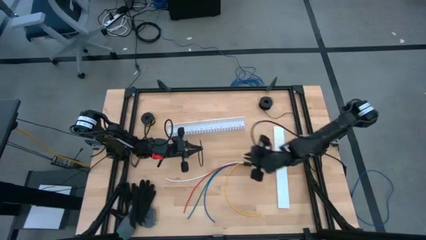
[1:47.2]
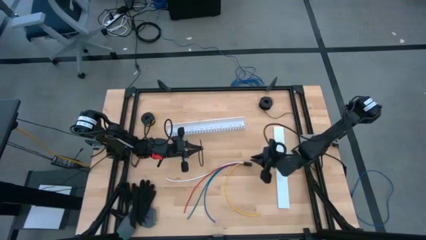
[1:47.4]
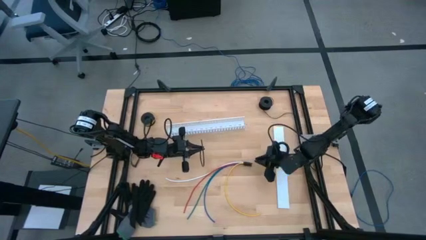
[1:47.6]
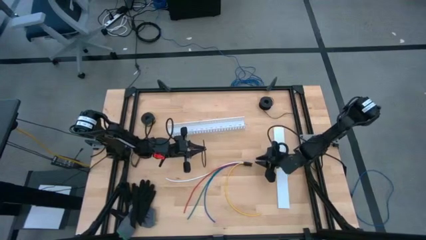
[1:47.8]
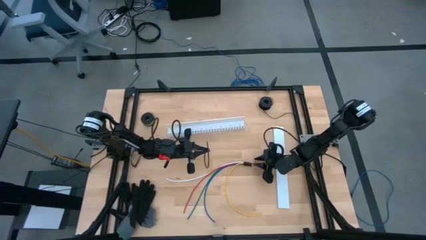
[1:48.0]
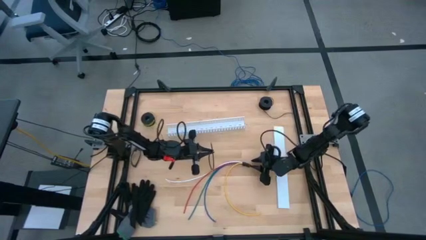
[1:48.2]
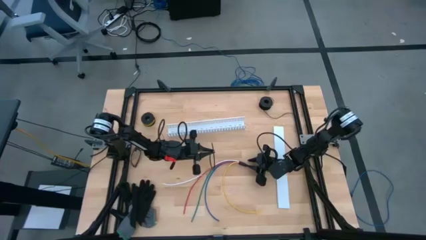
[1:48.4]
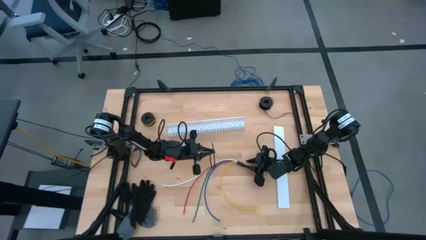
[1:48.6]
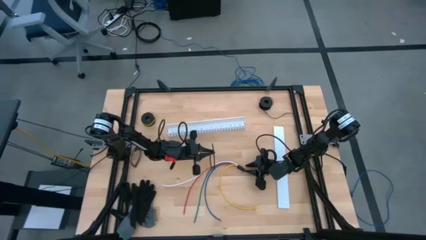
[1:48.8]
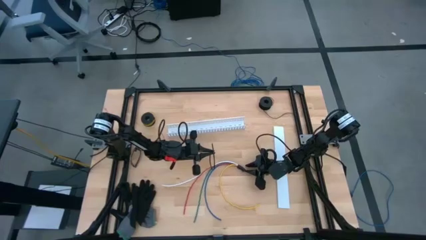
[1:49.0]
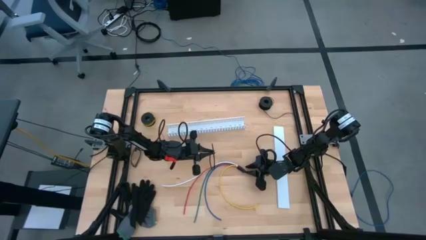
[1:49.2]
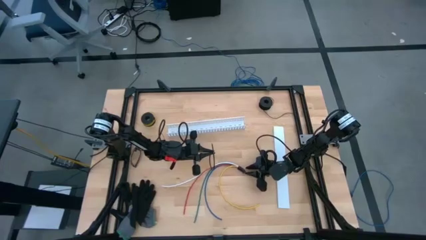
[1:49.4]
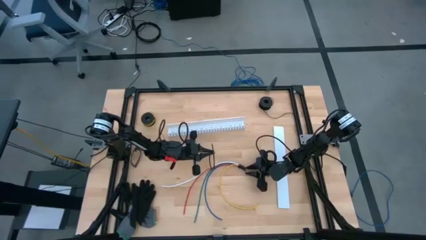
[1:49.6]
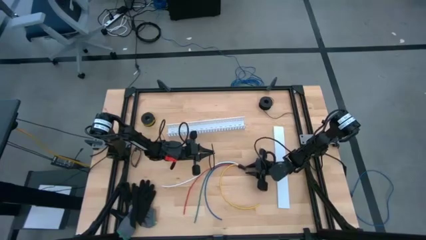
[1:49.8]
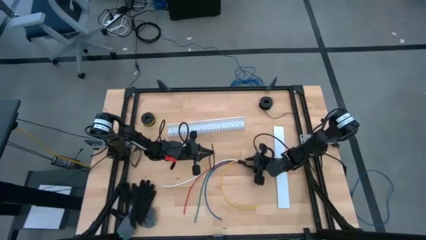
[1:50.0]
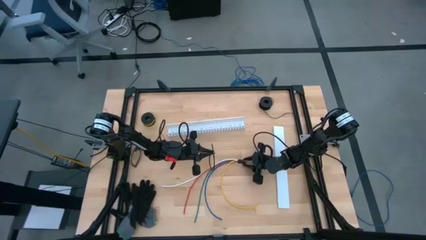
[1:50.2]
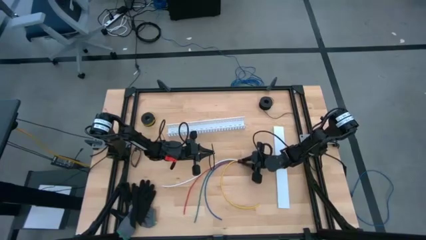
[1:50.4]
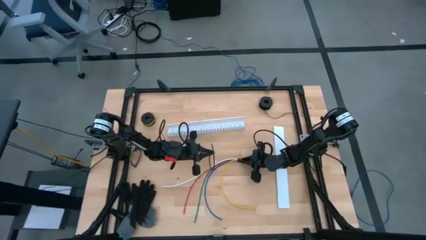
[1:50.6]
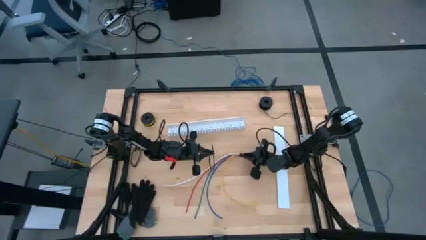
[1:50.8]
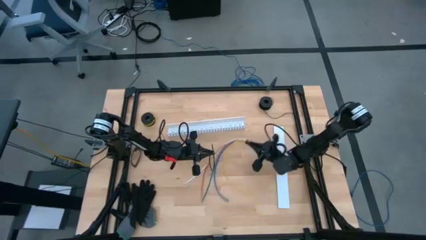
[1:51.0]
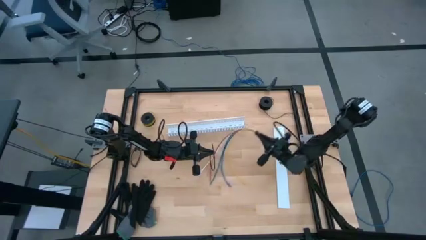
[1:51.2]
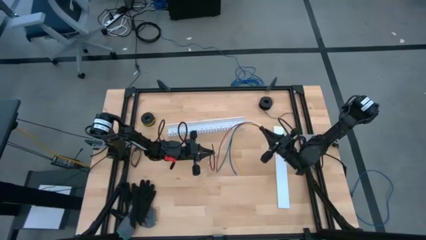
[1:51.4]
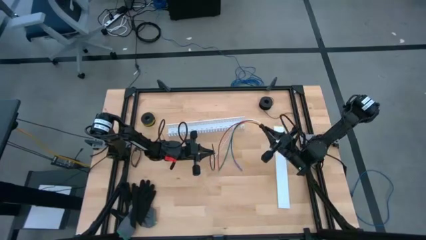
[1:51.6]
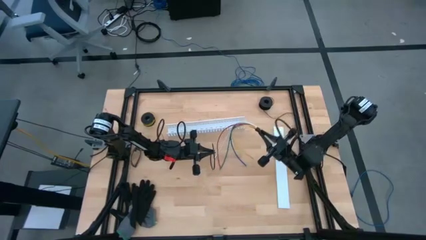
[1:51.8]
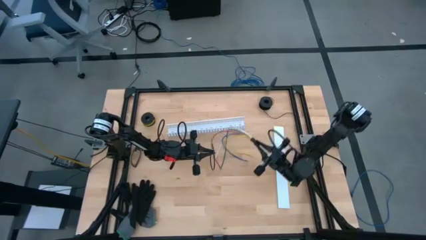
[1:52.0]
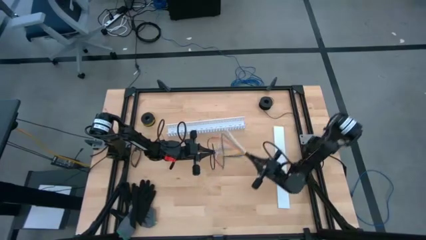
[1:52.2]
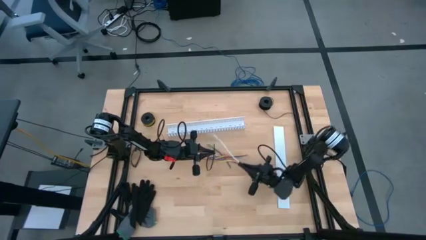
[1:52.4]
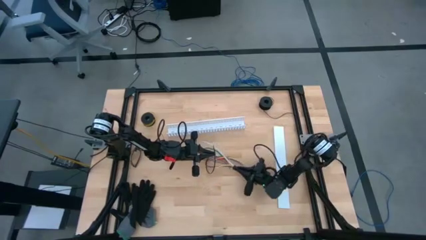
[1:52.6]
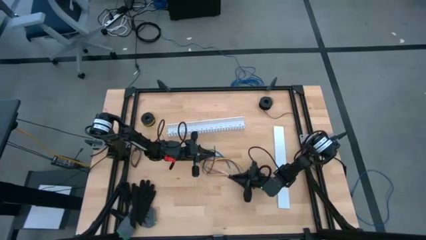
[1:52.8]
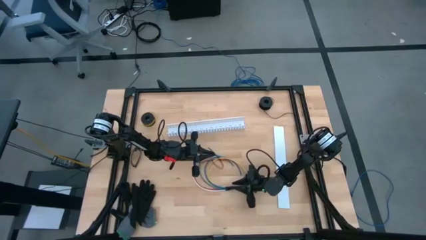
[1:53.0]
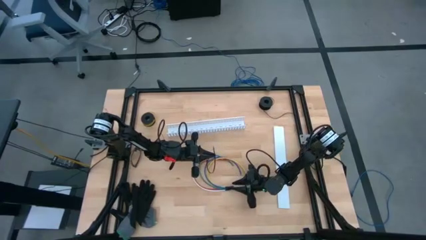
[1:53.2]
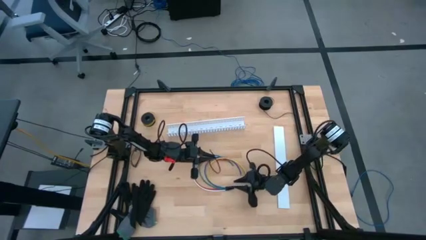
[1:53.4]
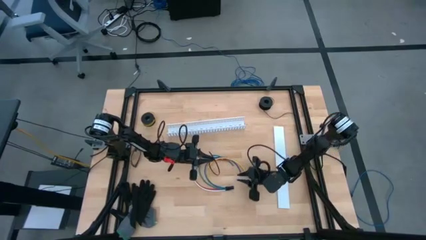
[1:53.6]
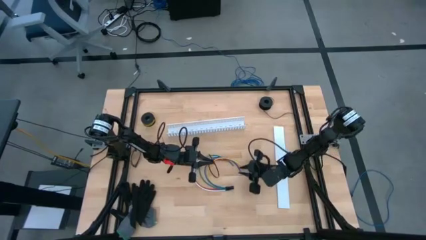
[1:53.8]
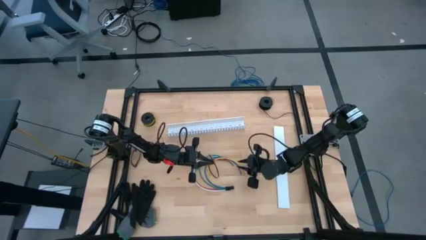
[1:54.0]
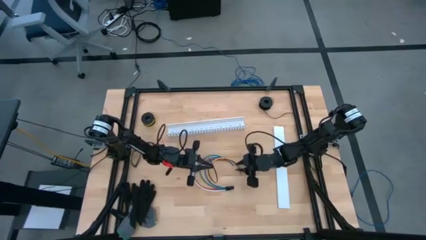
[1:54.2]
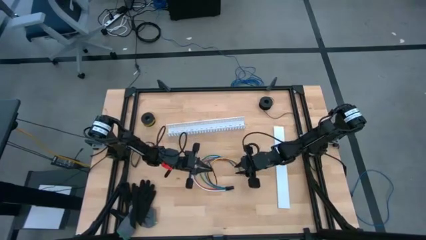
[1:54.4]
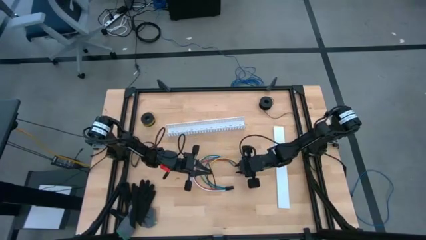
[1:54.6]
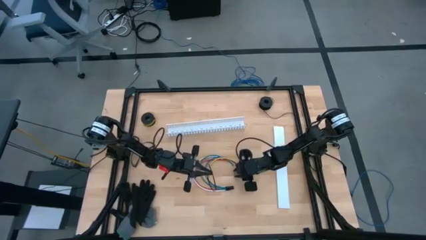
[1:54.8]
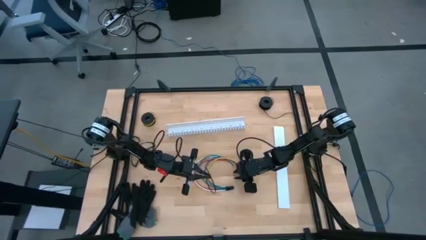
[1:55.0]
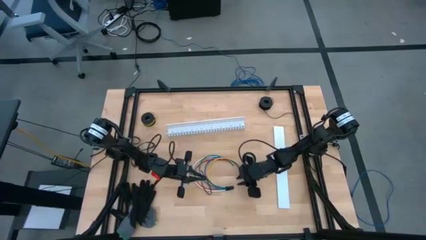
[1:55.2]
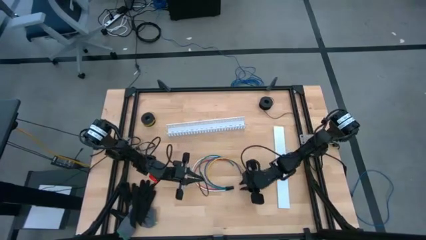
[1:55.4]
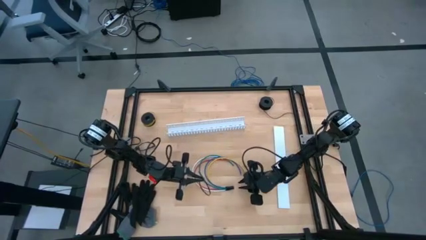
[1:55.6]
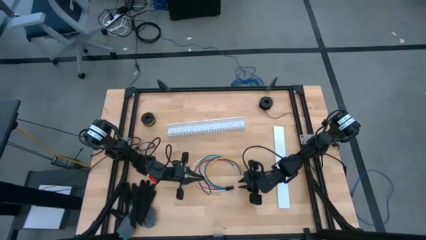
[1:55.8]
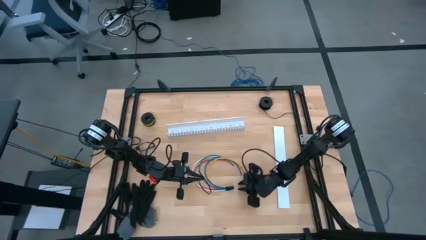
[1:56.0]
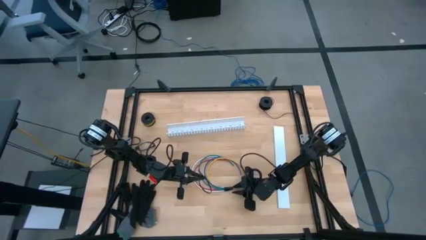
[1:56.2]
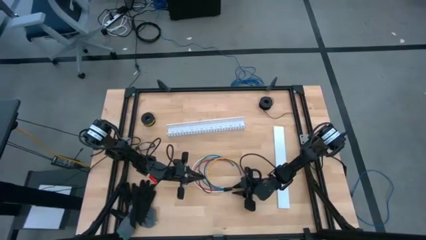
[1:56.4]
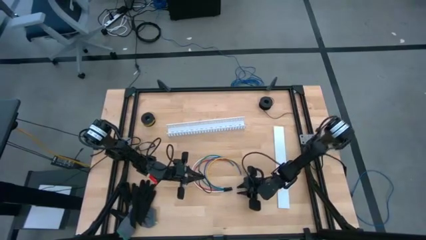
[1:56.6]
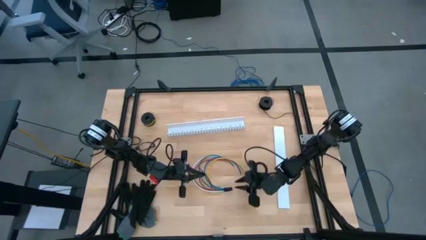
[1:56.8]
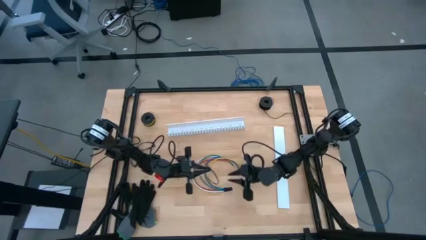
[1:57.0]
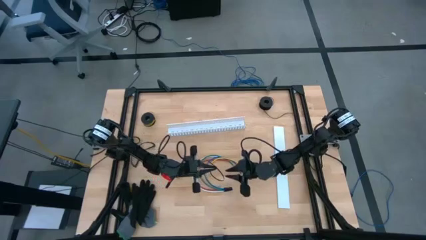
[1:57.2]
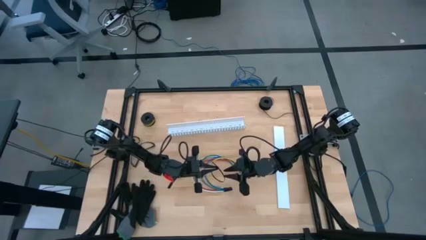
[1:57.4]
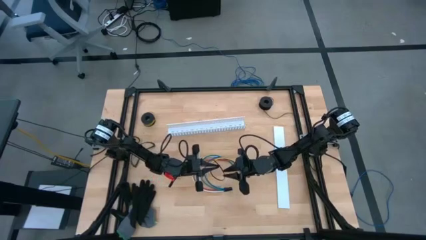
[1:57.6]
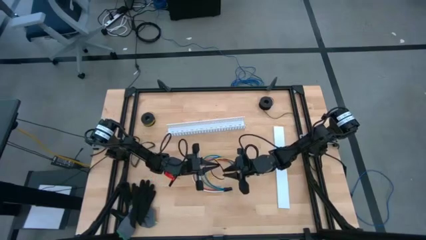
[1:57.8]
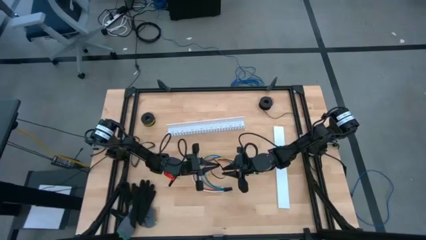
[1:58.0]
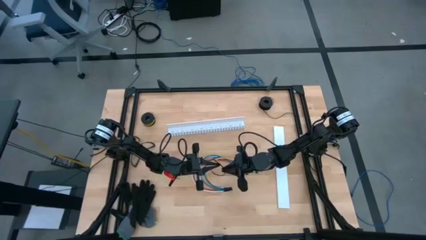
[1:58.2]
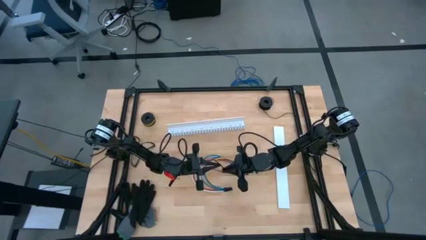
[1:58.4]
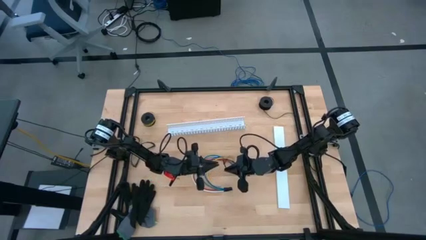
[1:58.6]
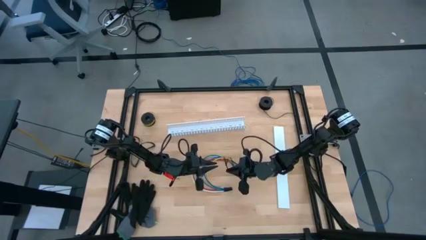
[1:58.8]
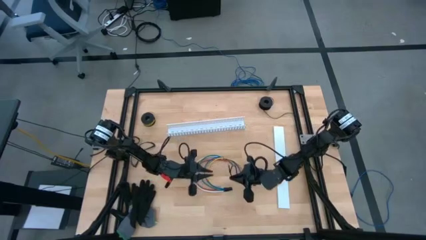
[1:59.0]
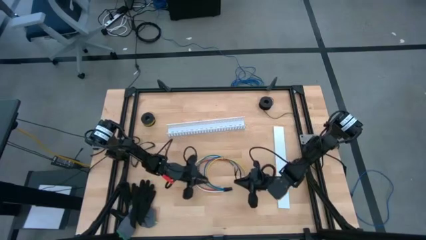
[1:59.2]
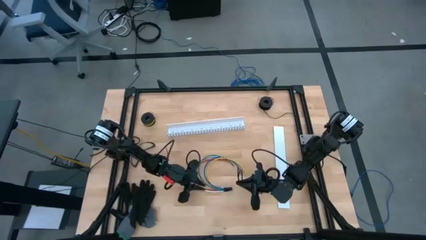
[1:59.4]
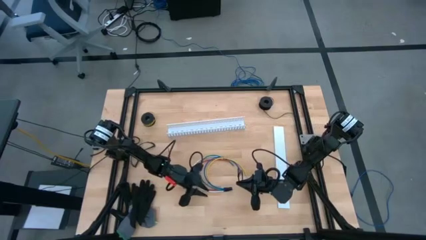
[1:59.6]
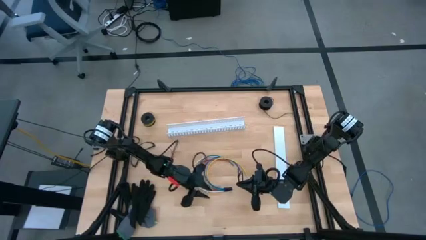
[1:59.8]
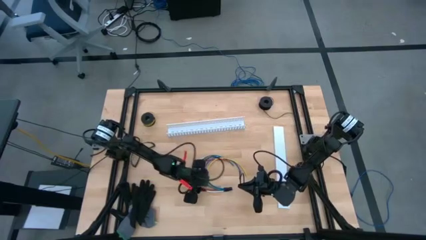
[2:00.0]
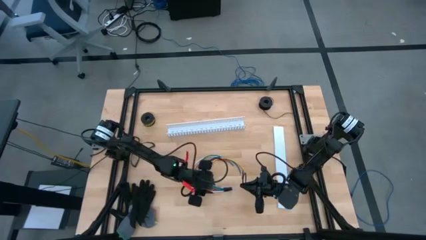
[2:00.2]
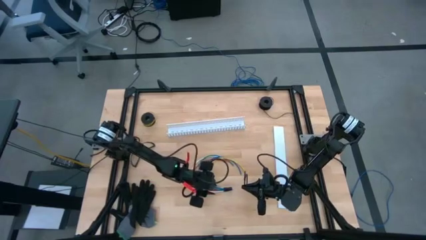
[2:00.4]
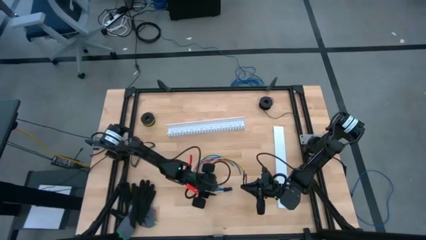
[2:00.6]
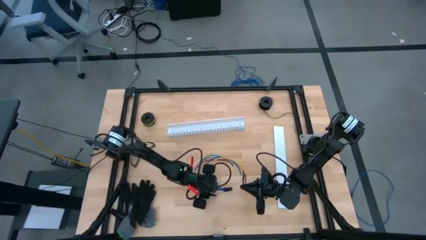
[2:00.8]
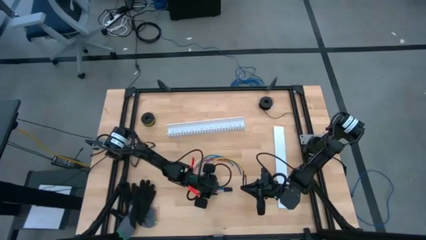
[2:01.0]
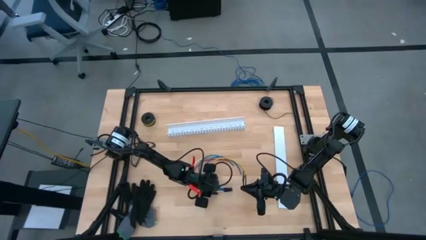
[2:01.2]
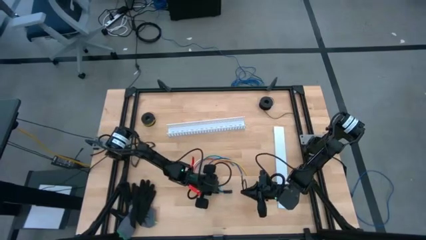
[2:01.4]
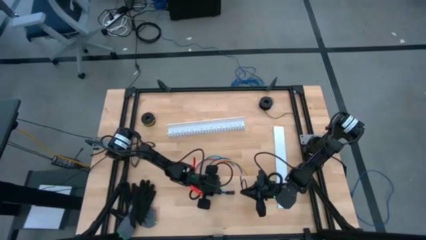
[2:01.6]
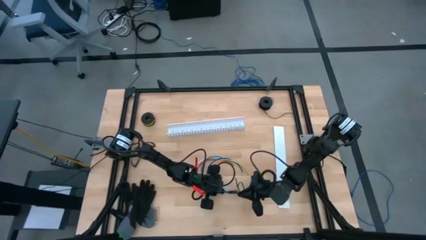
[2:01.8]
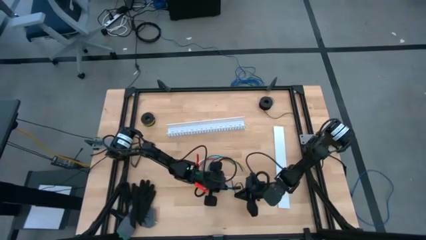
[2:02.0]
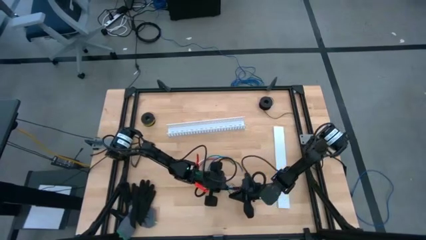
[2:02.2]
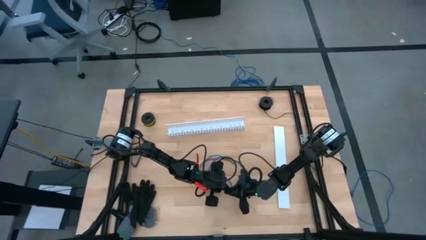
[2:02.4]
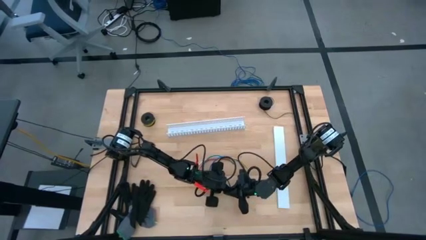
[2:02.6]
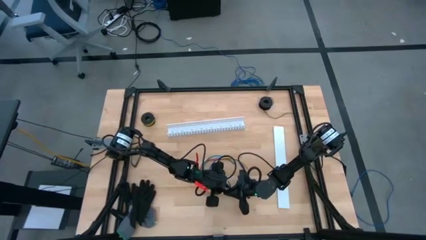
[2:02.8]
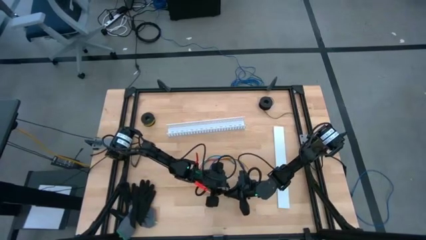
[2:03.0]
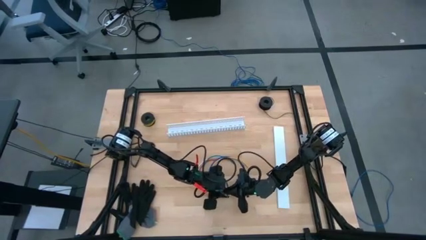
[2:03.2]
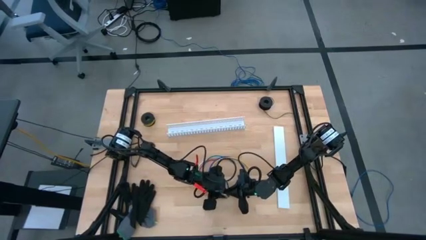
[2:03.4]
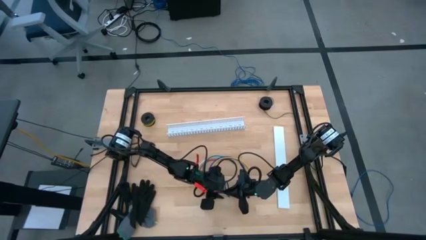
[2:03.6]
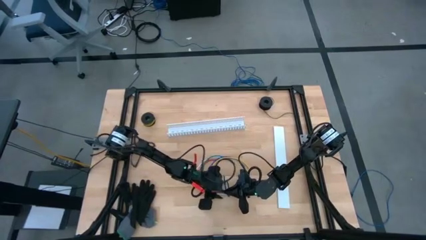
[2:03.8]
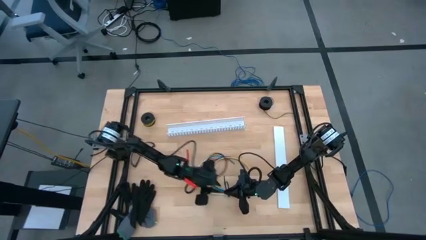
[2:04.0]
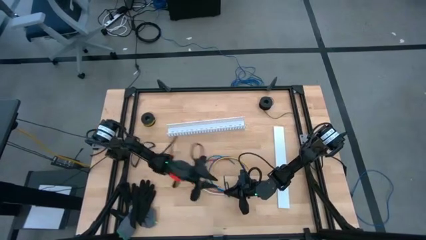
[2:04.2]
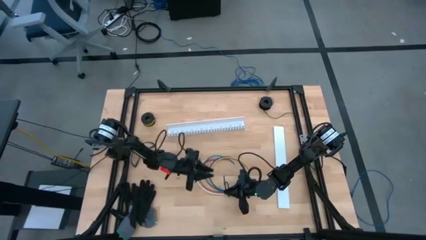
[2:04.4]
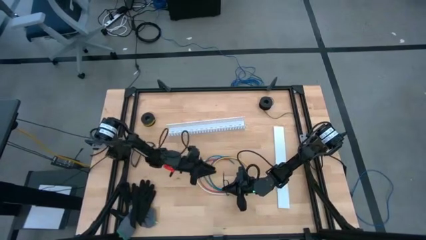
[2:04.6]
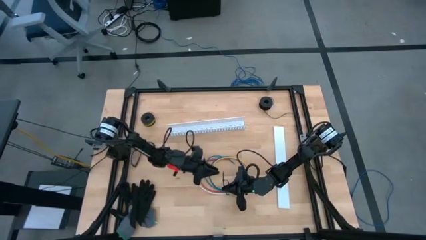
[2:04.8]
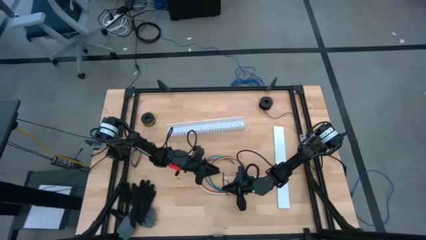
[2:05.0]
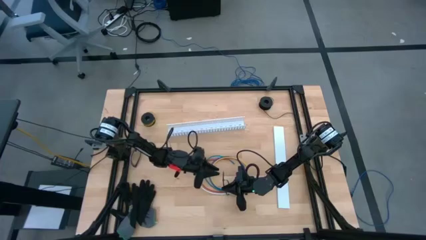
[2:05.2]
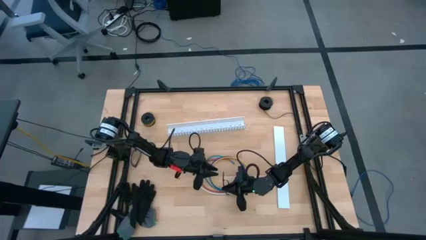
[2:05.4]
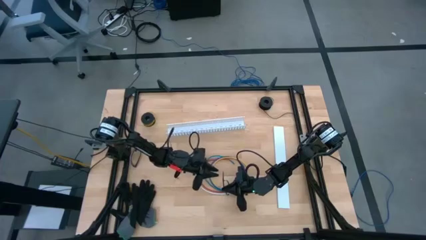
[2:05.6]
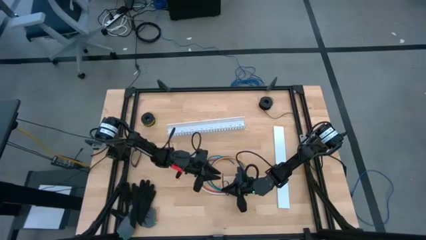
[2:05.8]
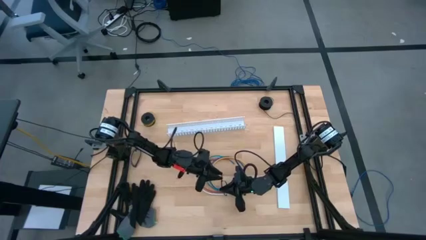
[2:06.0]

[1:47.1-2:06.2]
Task: Ziptie cables
Insert zip tie on the cable wire
